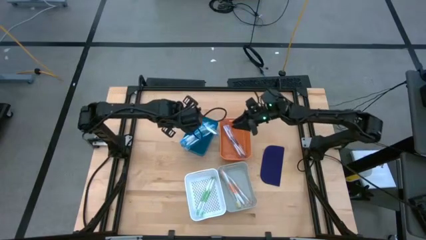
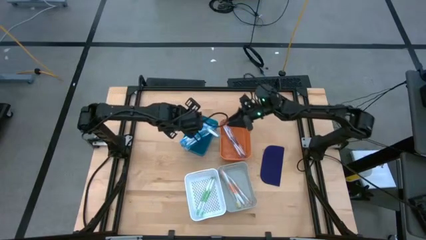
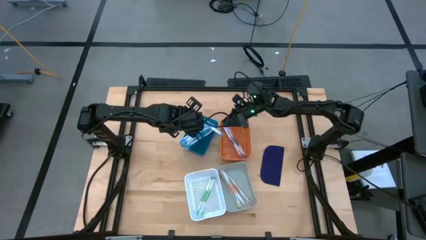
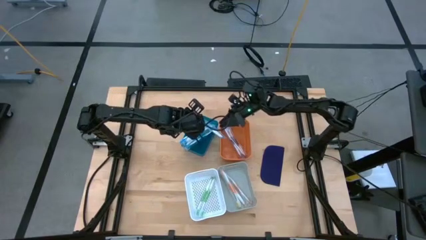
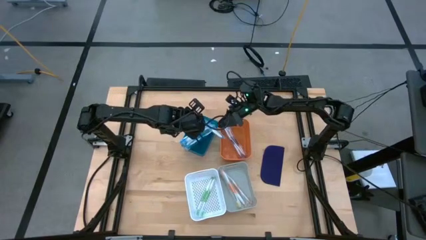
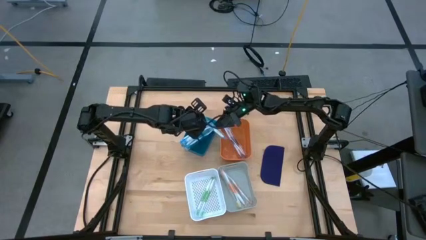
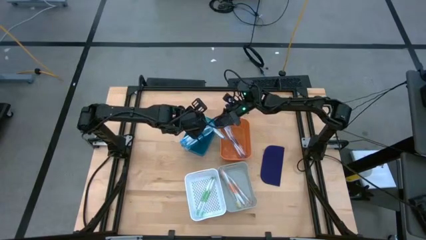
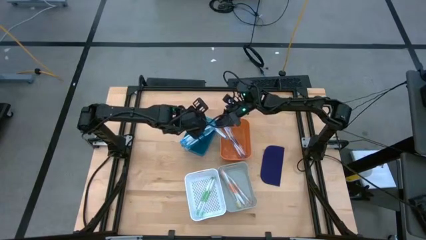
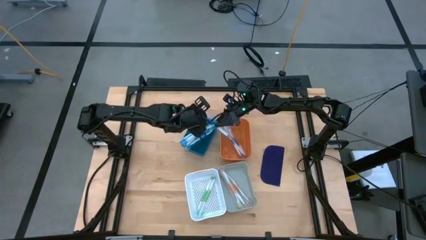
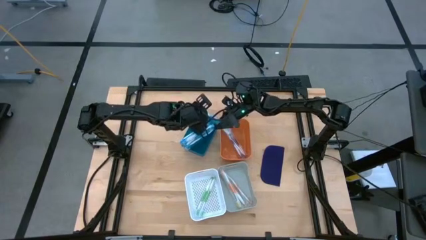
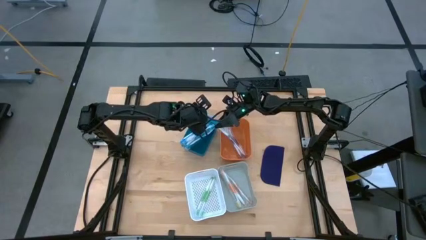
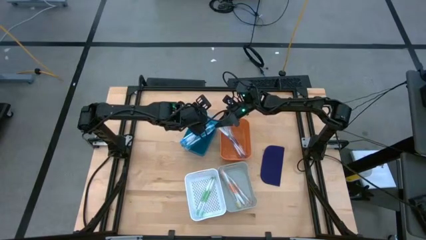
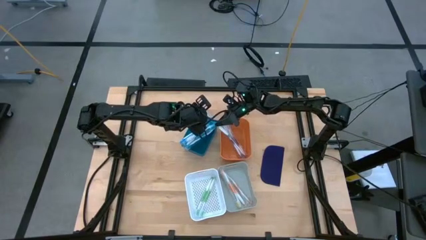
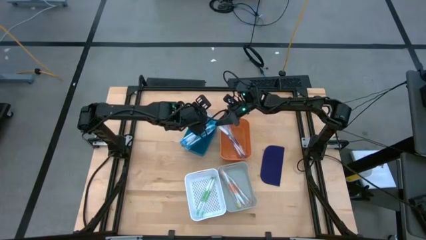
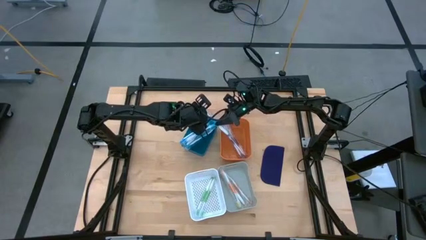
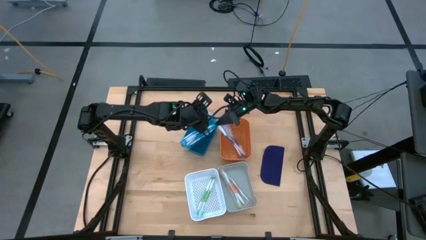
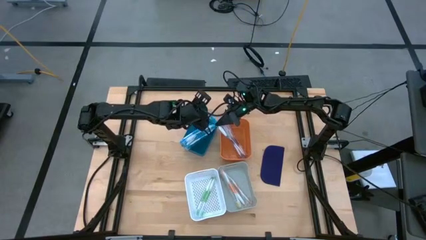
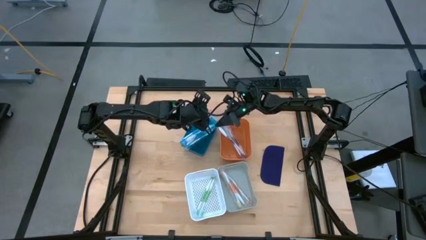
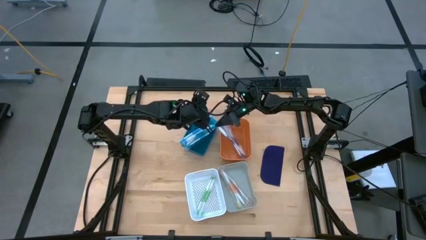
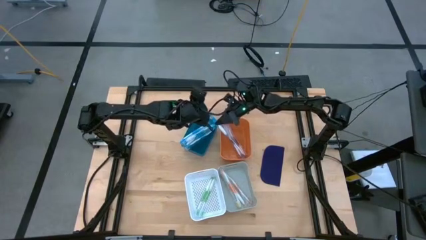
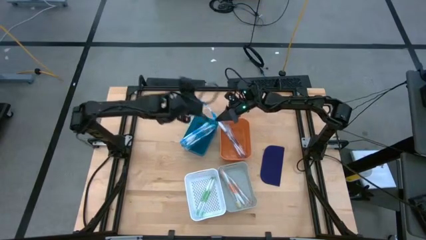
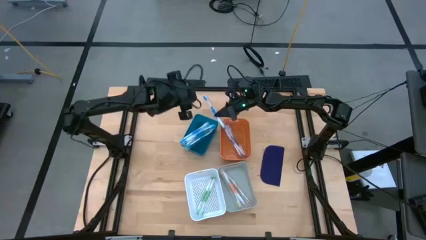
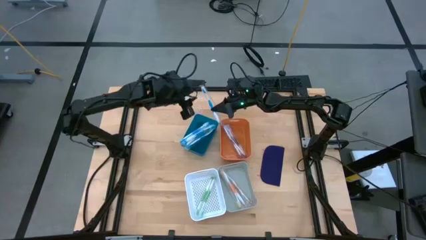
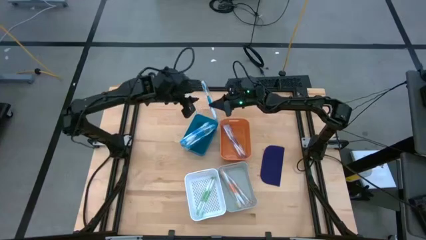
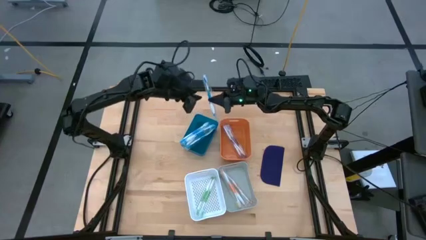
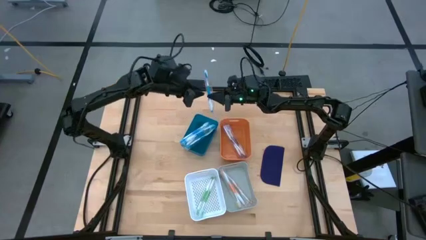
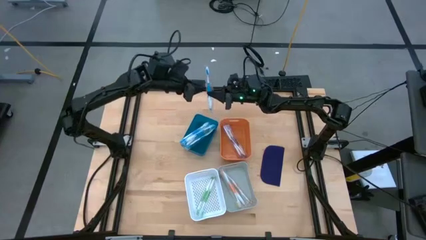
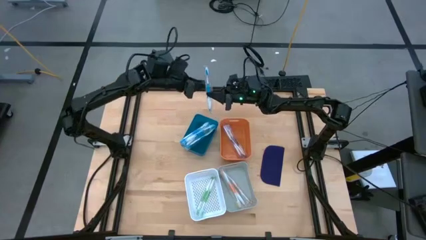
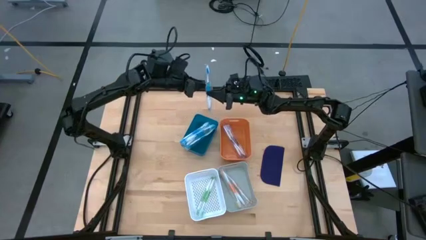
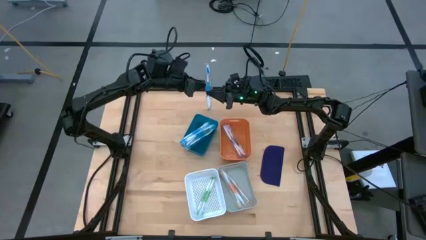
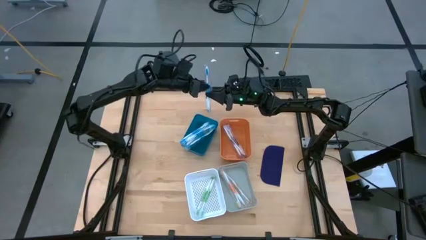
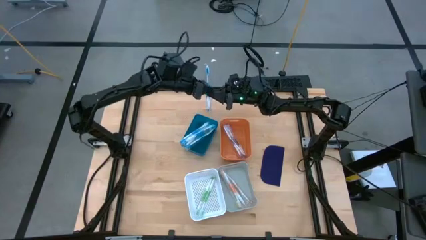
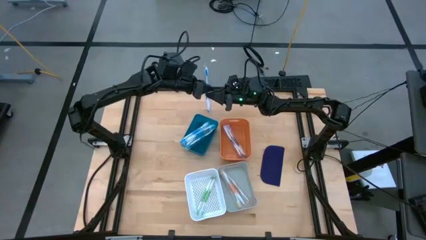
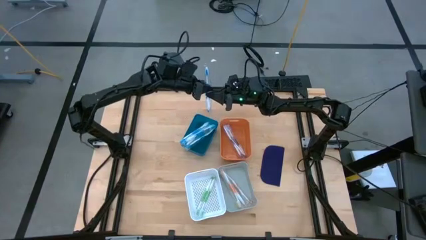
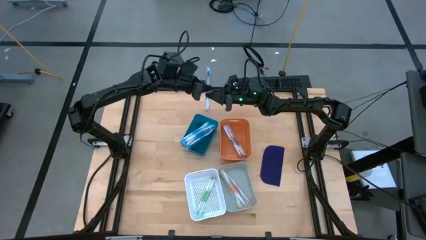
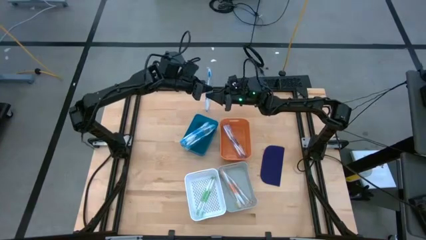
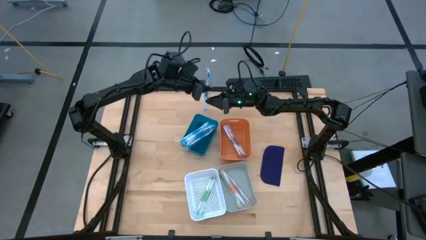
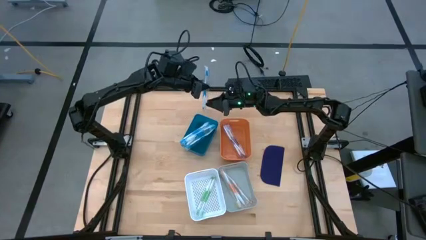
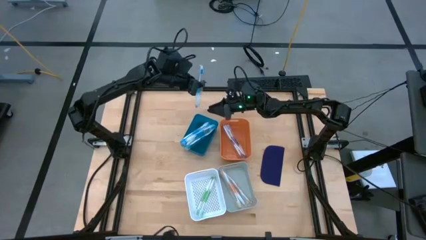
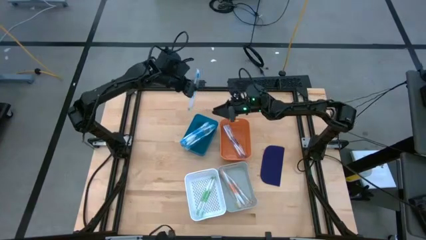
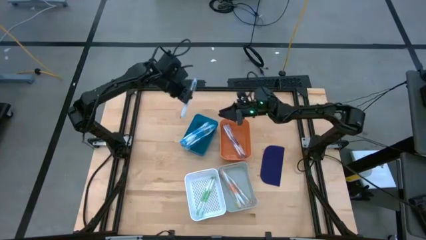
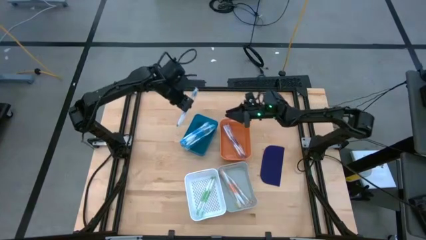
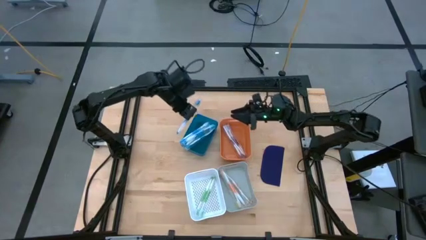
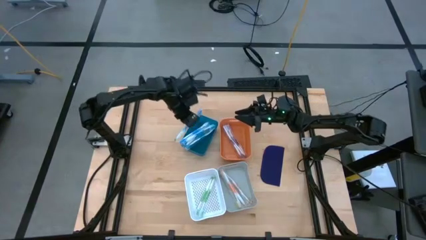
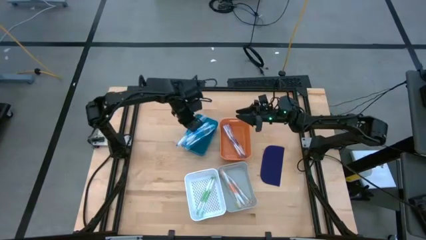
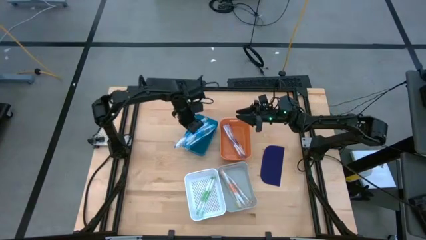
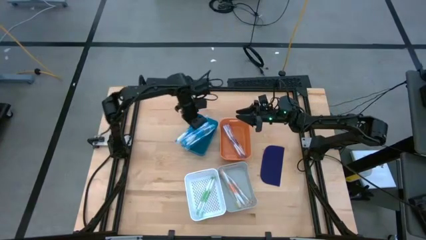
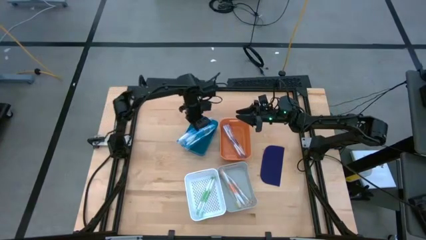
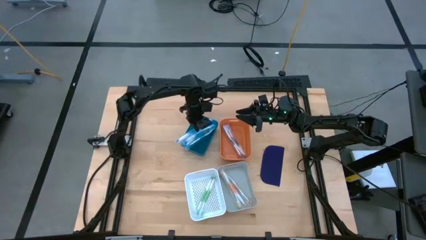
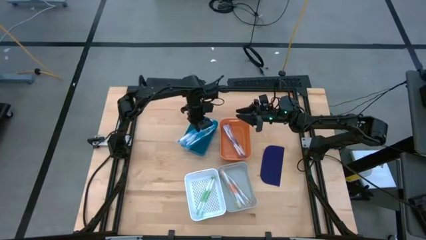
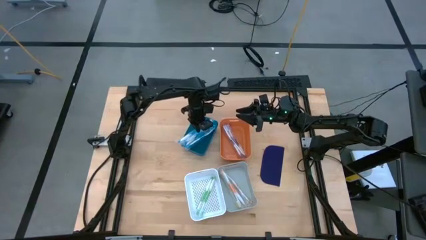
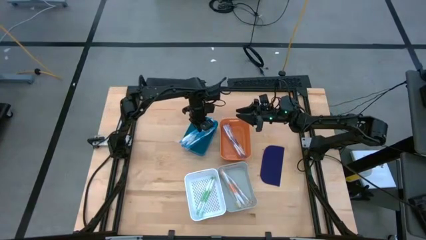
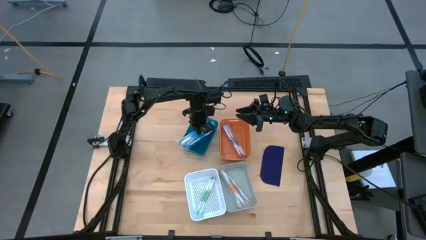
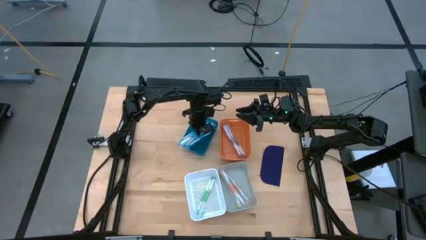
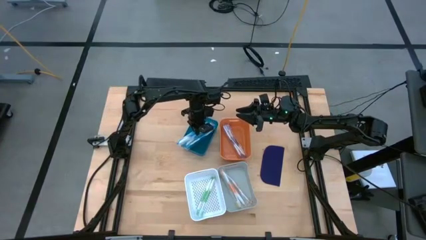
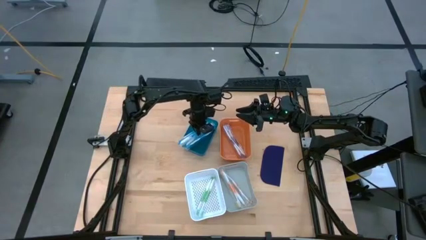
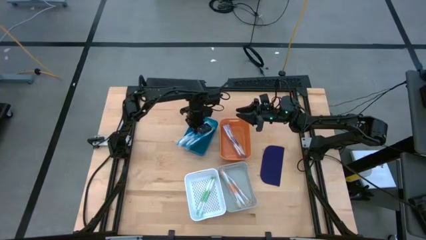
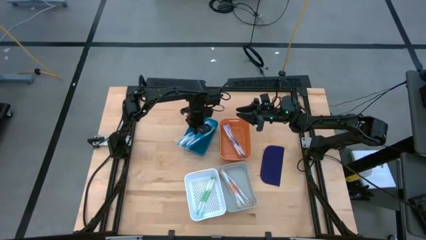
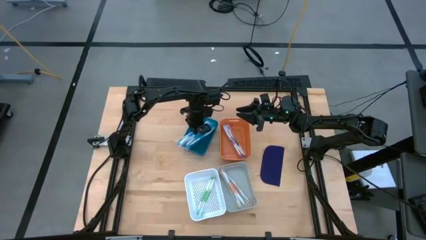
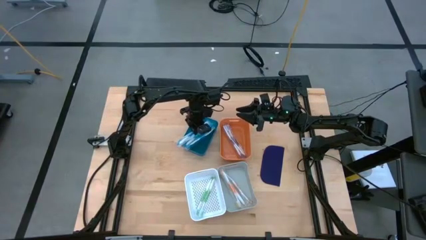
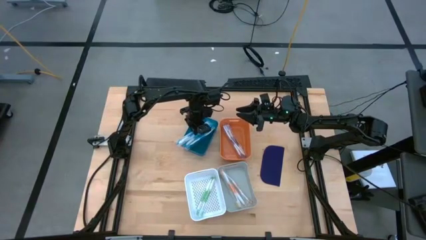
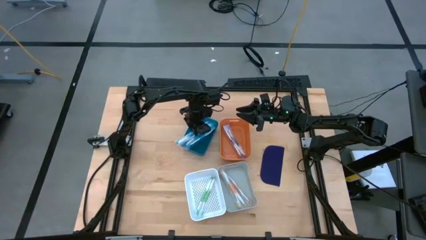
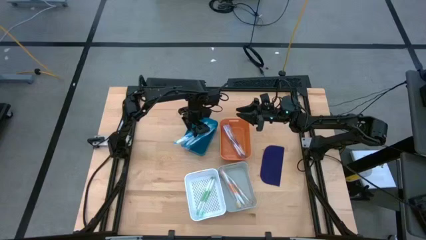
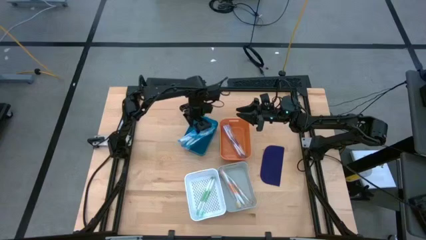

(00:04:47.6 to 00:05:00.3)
Task: Pick & Place Toothbrushes
Put the blue toothbrush into the blue bin

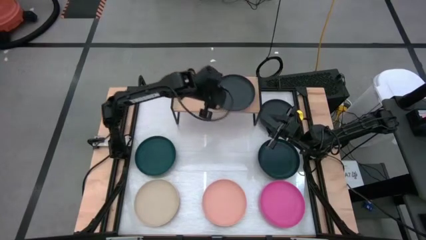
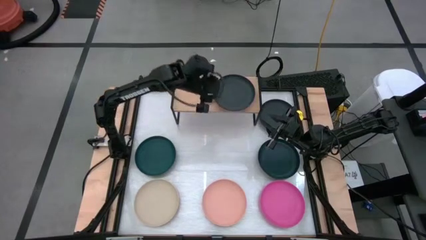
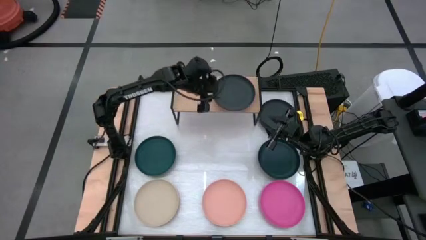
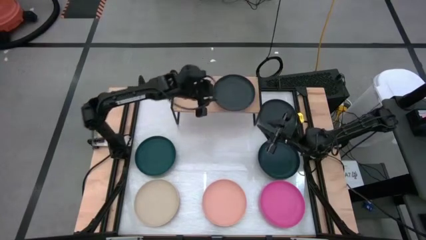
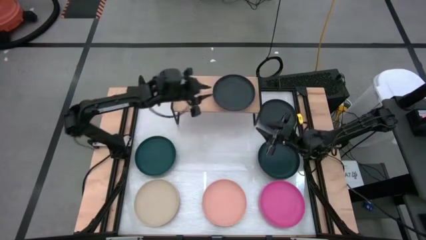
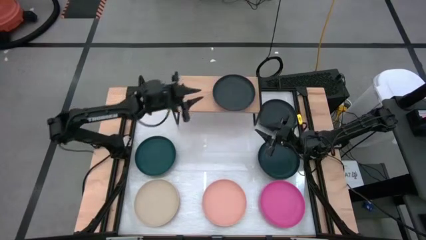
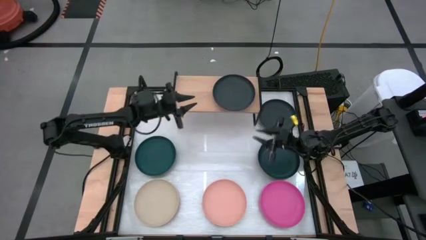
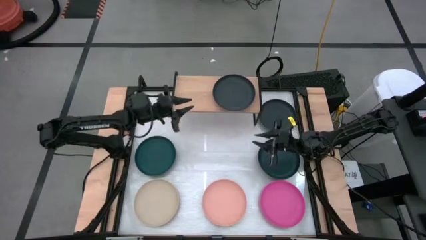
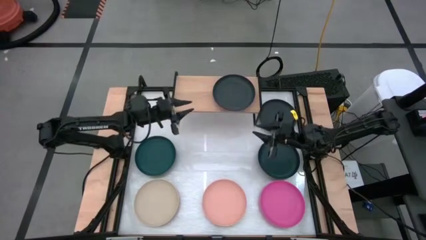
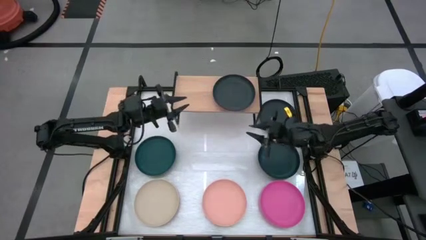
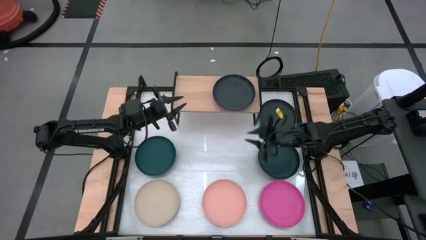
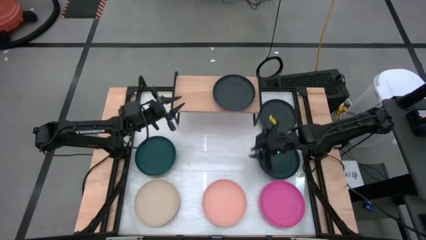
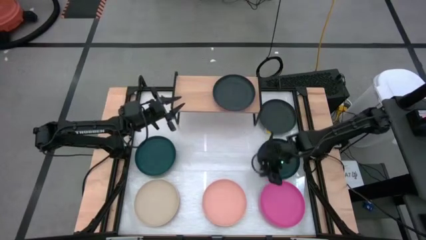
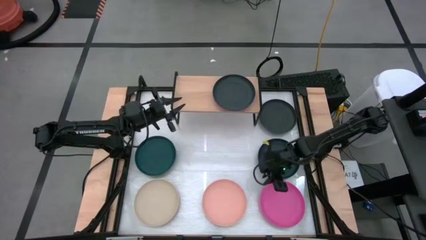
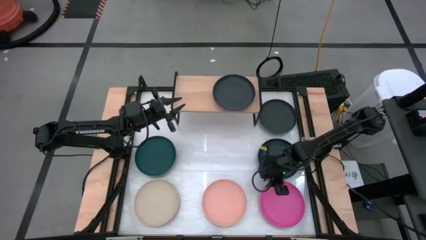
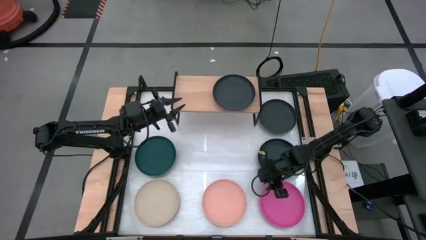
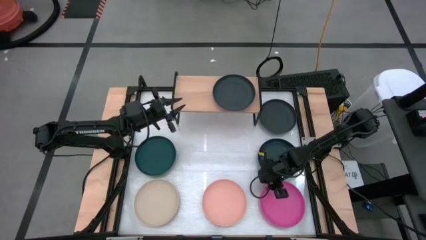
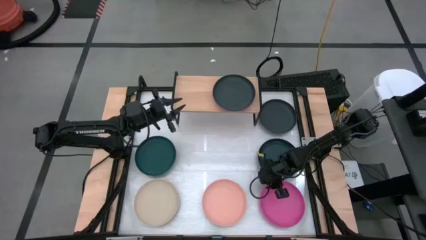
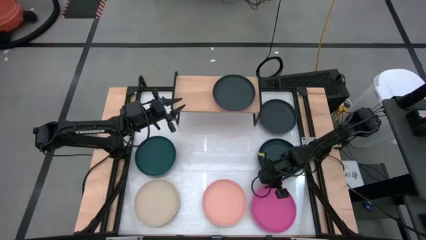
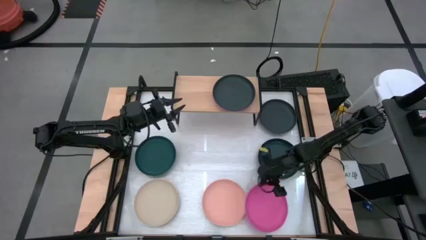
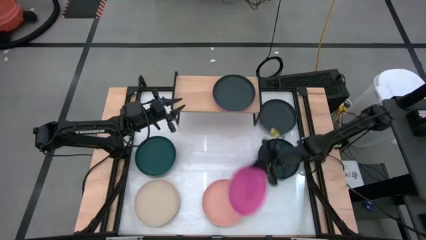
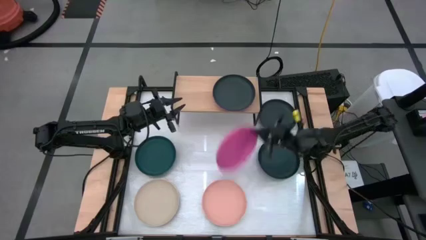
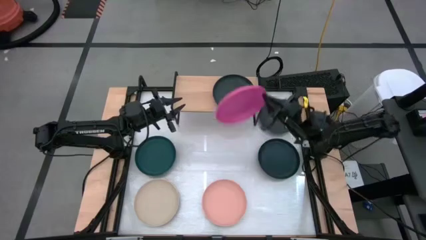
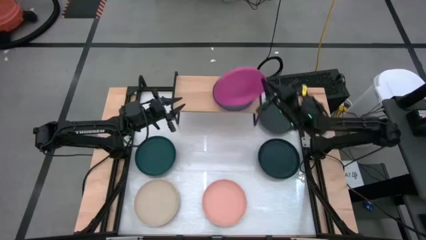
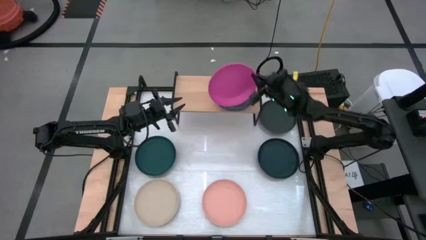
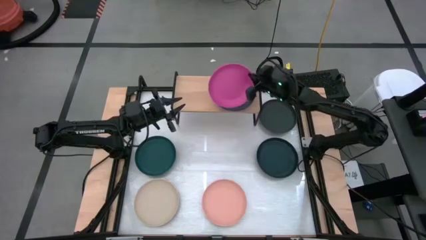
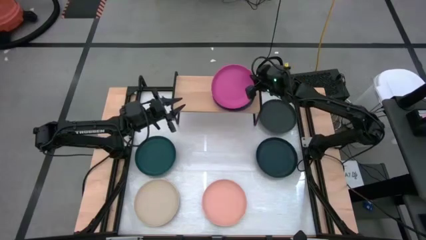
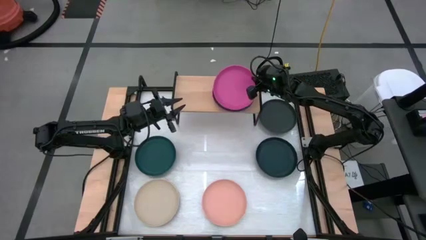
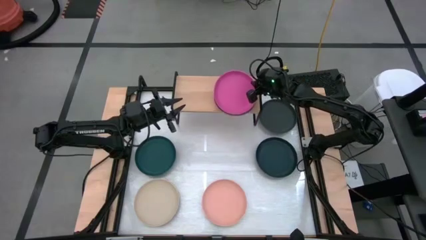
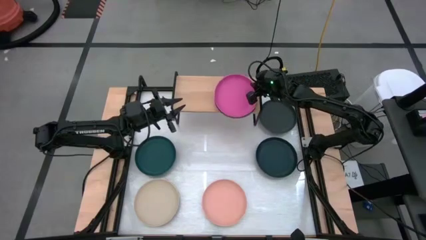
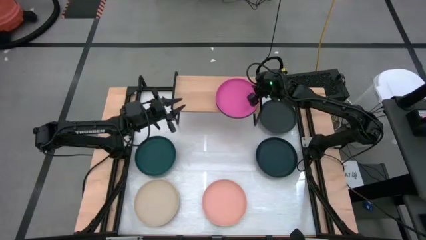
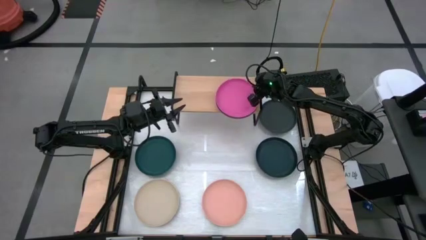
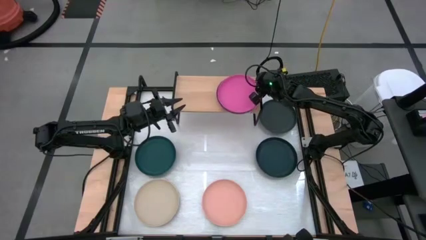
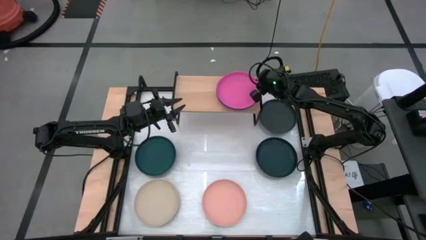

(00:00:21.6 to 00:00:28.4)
Task: Place and stack plates onto a shelf
Stack the pink plate on top of the black plate on the shelf
